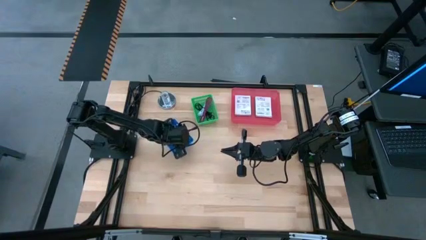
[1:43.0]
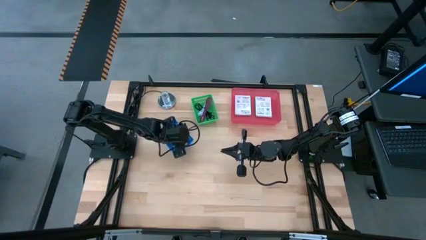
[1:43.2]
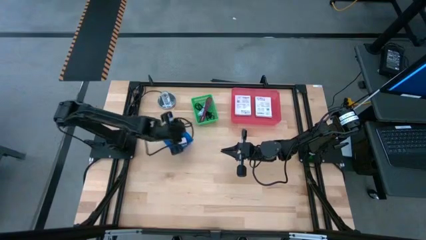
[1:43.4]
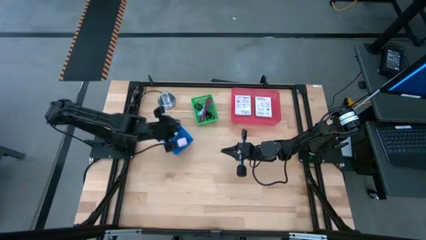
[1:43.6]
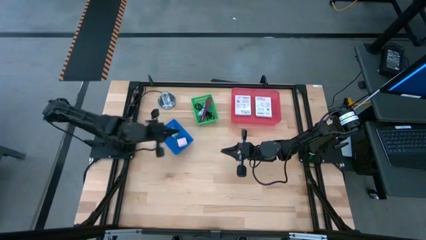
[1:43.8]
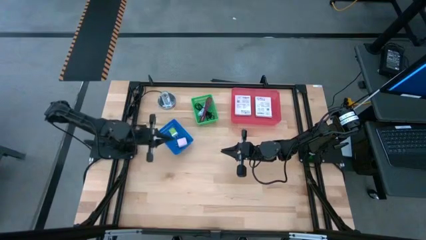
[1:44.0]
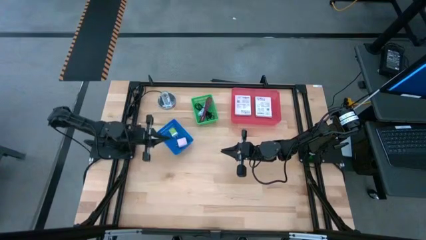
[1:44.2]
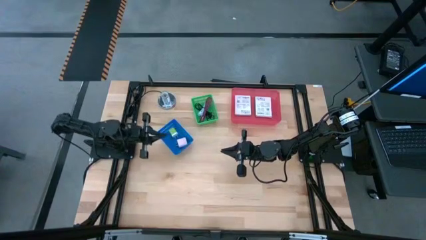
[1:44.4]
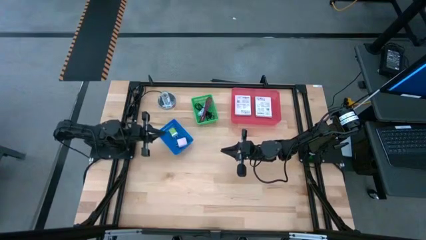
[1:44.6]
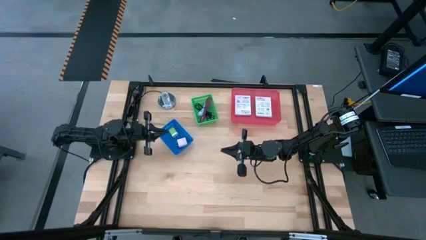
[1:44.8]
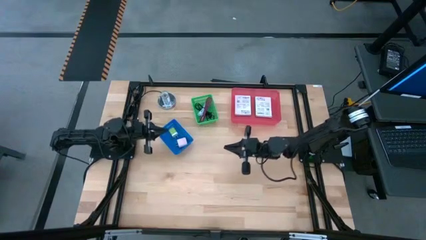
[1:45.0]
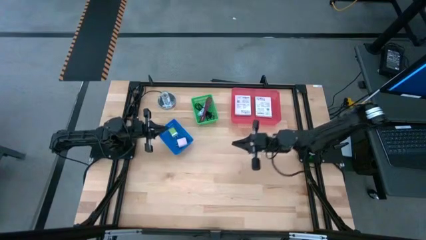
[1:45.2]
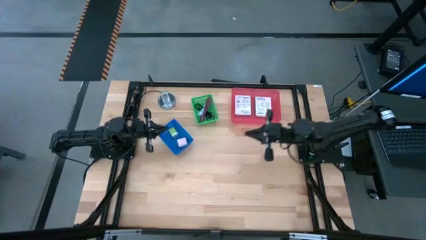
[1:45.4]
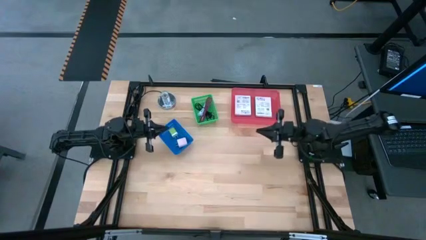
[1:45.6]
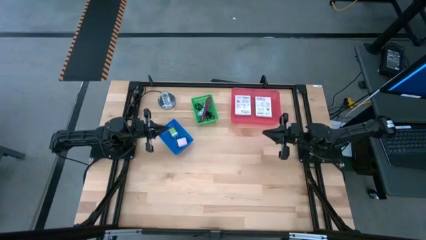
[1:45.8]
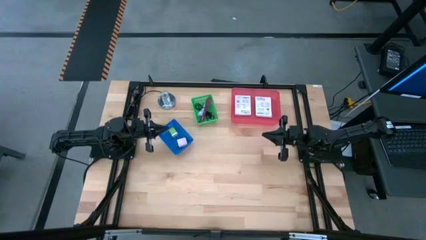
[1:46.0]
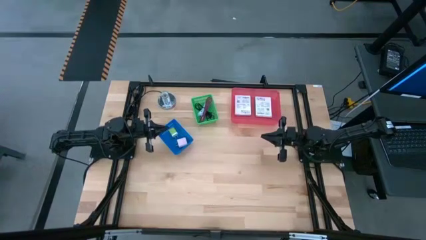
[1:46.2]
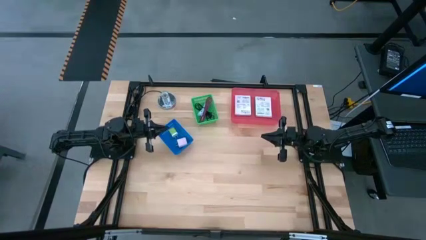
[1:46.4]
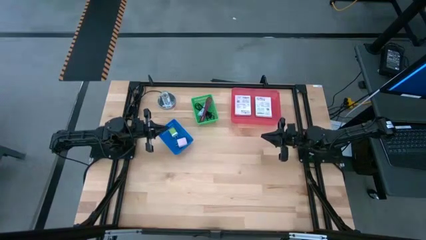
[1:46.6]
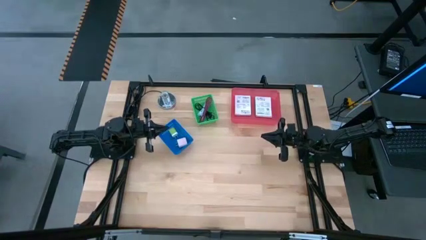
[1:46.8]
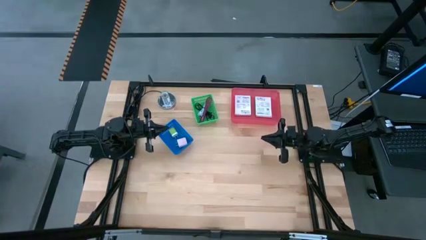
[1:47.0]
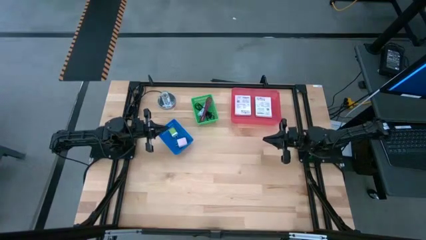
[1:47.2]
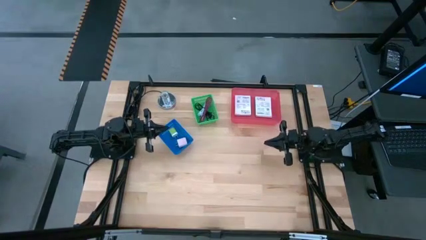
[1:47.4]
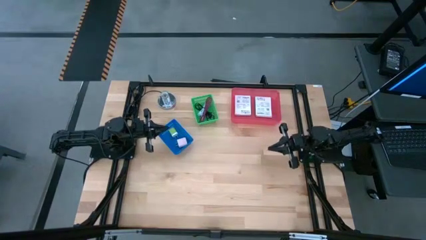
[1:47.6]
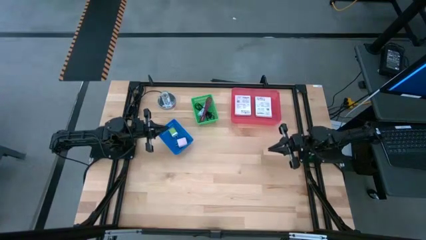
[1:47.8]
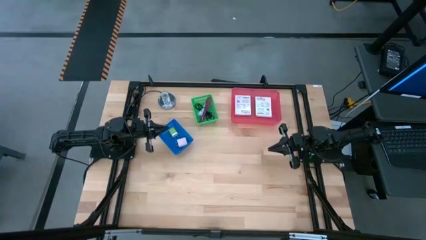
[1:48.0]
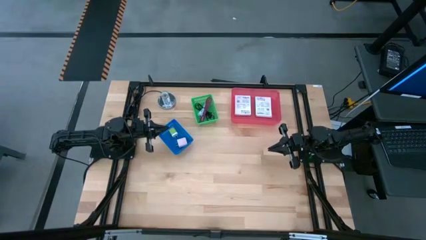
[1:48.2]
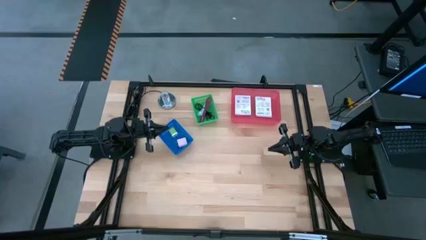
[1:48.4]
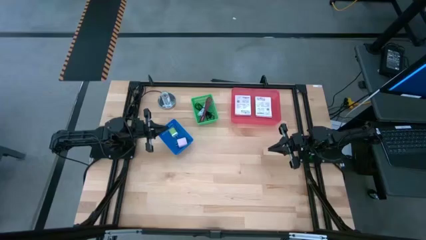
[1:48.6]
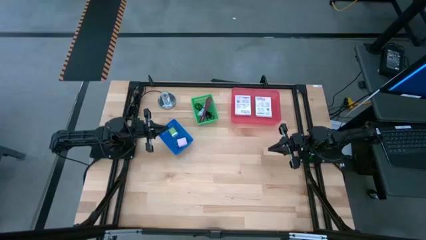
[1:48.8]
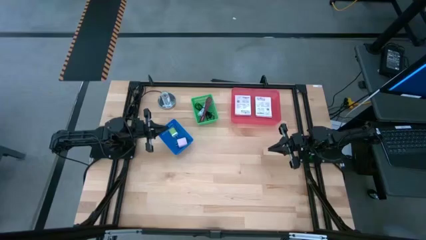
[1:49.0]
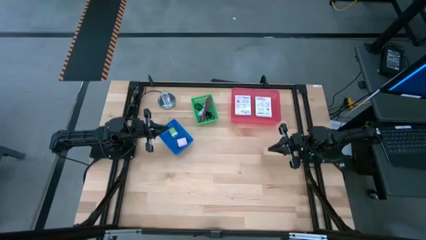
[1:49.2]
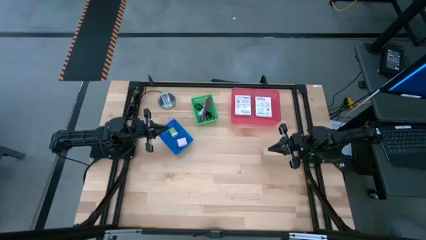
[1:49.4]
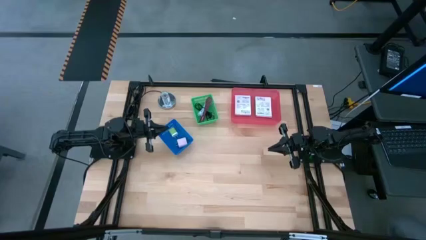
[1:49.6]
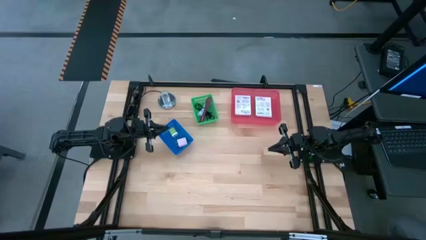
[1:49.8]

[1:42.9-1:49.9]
Task: Pick and place items into bin
Return to Home Position

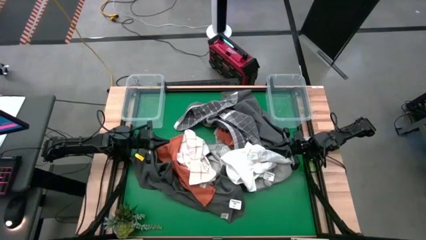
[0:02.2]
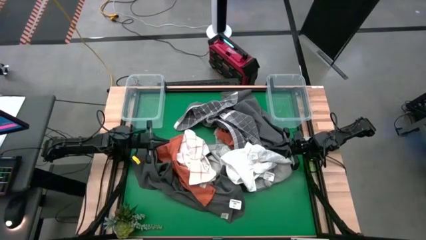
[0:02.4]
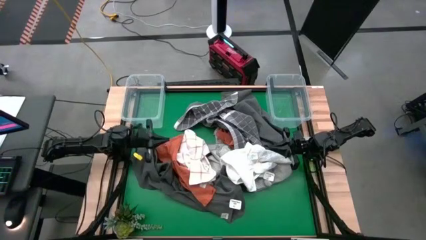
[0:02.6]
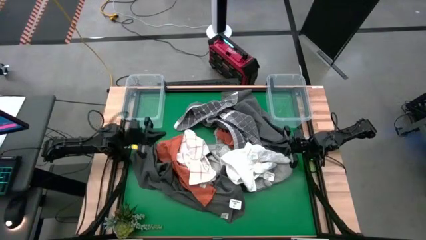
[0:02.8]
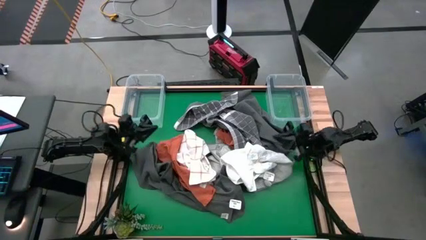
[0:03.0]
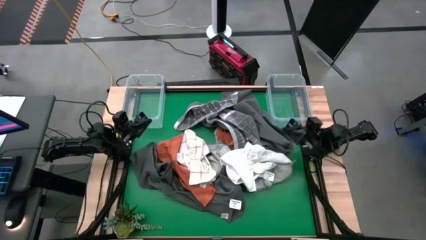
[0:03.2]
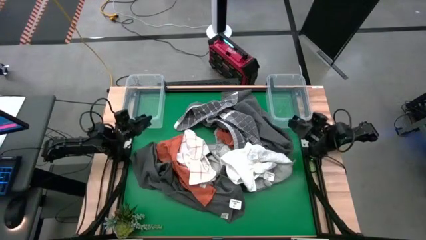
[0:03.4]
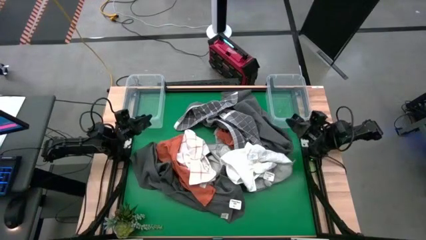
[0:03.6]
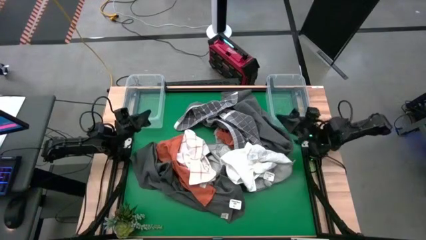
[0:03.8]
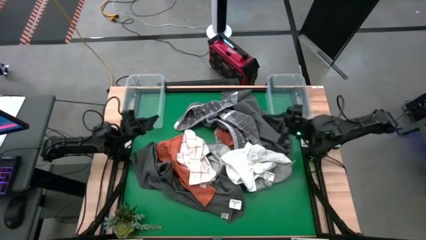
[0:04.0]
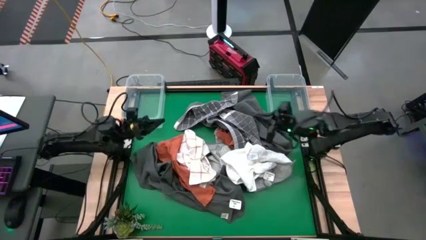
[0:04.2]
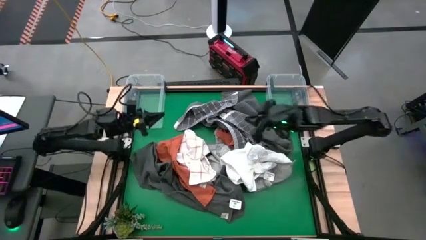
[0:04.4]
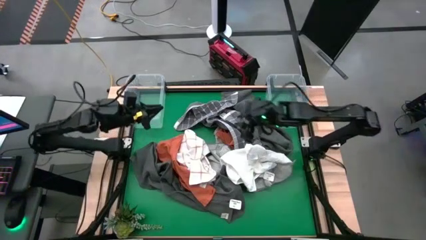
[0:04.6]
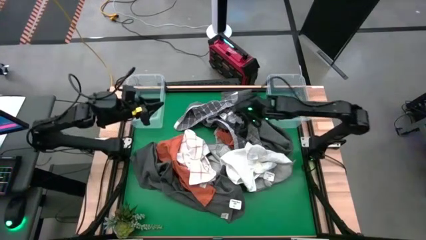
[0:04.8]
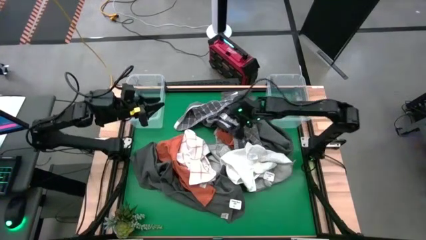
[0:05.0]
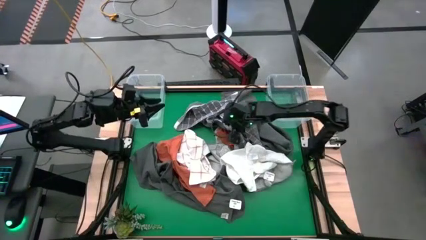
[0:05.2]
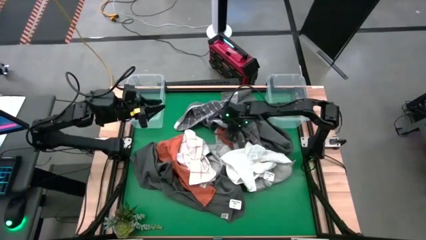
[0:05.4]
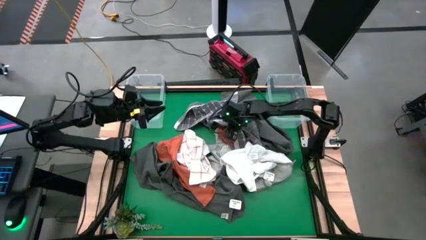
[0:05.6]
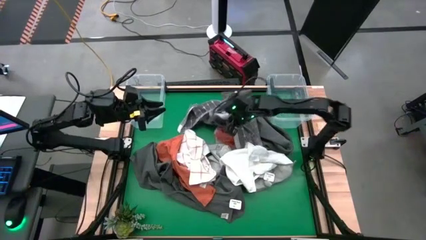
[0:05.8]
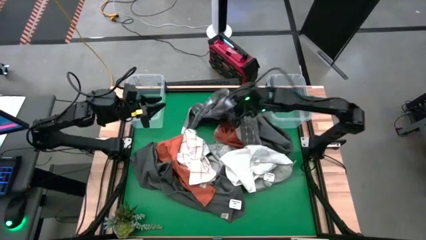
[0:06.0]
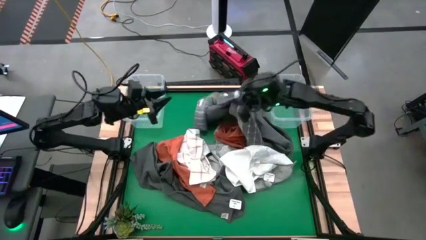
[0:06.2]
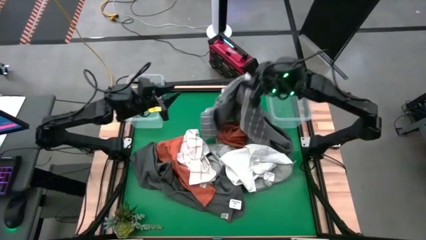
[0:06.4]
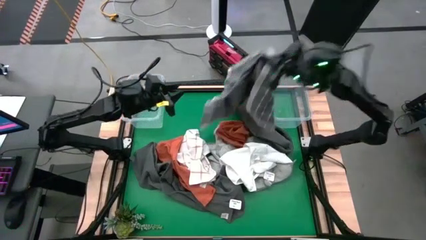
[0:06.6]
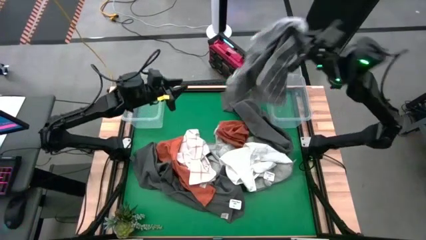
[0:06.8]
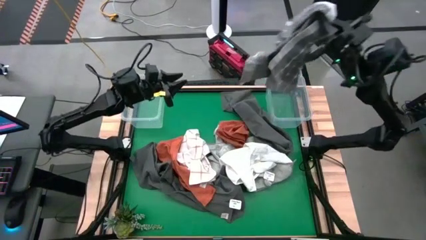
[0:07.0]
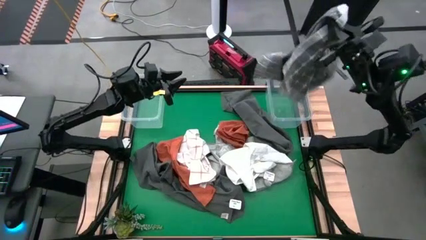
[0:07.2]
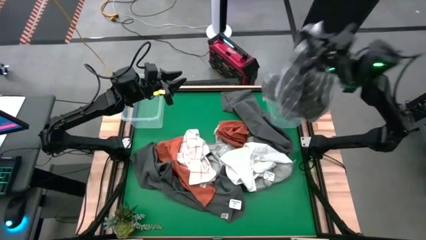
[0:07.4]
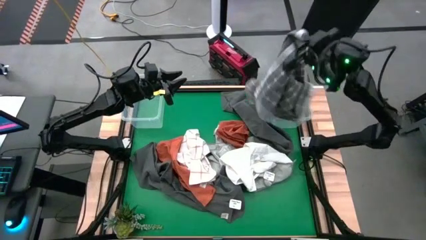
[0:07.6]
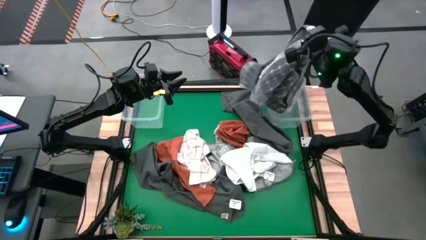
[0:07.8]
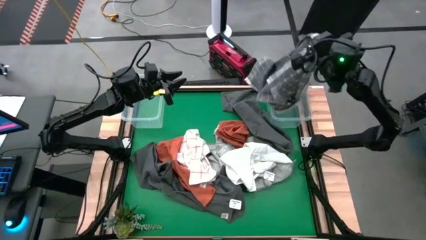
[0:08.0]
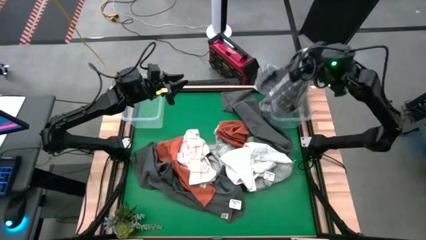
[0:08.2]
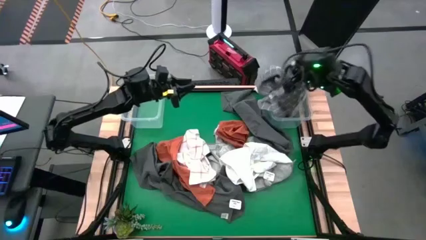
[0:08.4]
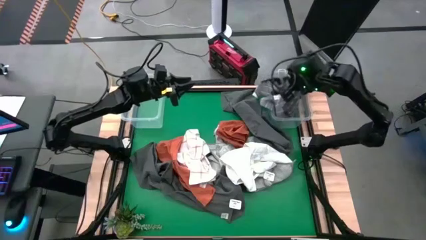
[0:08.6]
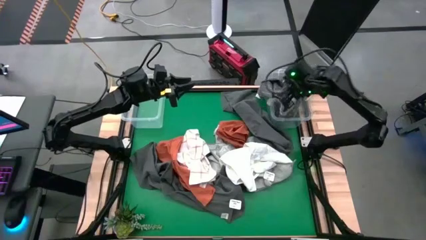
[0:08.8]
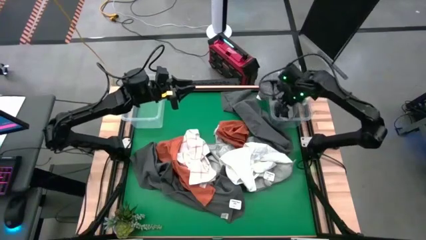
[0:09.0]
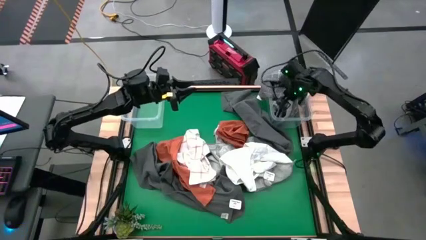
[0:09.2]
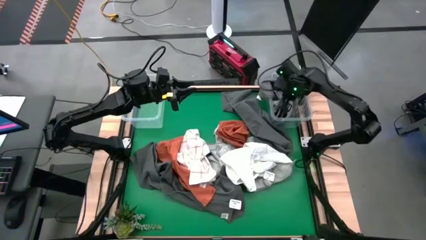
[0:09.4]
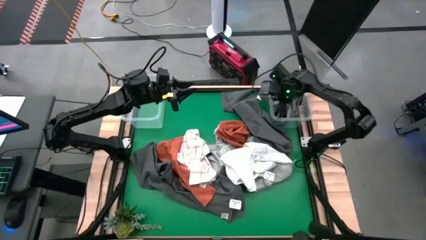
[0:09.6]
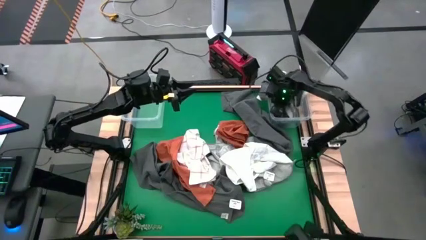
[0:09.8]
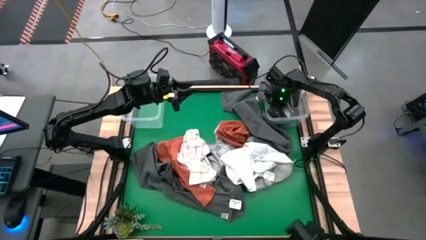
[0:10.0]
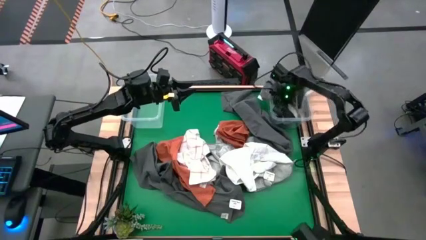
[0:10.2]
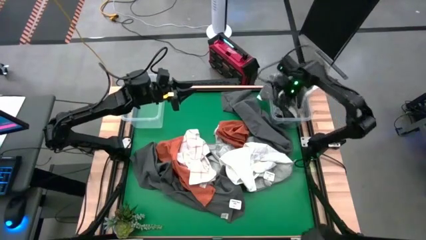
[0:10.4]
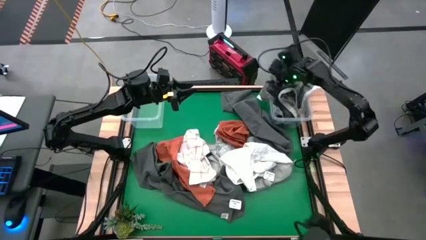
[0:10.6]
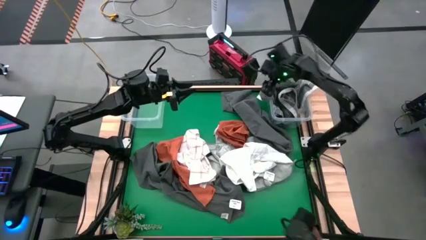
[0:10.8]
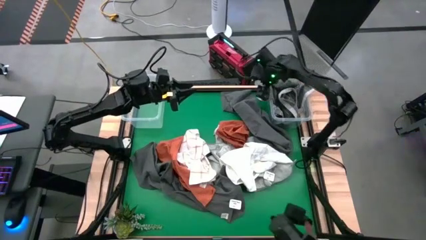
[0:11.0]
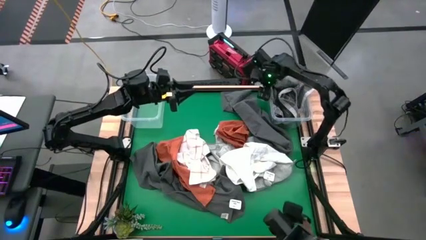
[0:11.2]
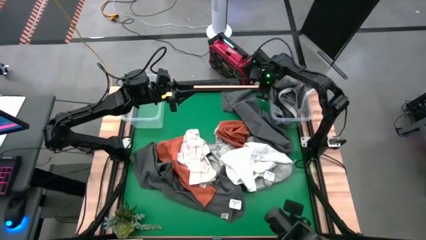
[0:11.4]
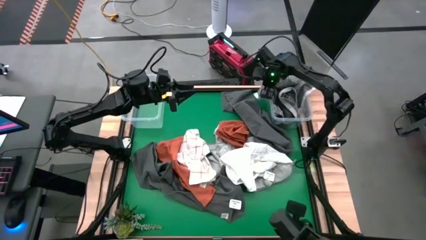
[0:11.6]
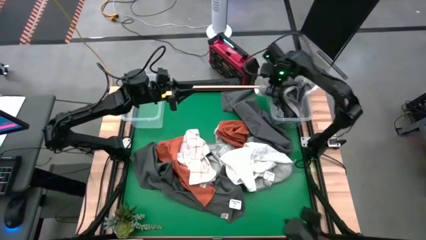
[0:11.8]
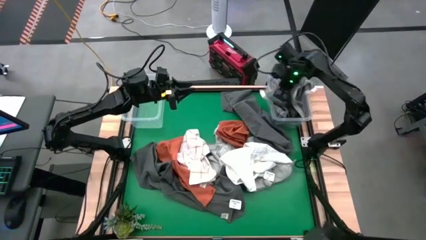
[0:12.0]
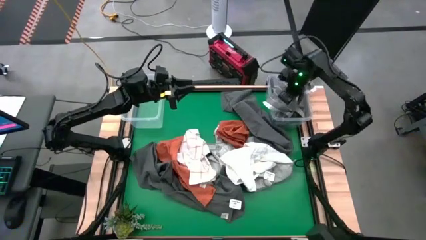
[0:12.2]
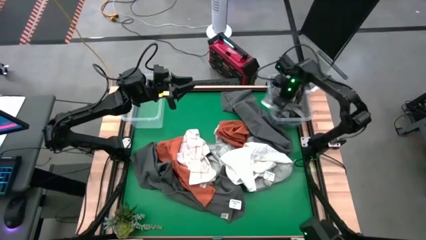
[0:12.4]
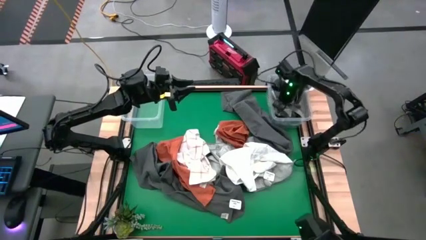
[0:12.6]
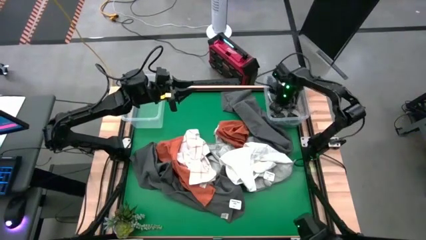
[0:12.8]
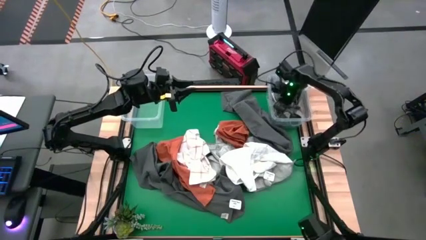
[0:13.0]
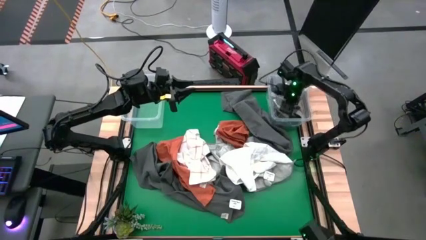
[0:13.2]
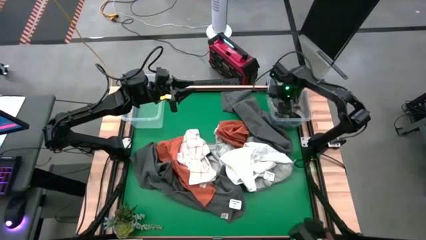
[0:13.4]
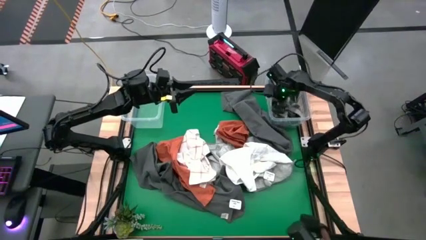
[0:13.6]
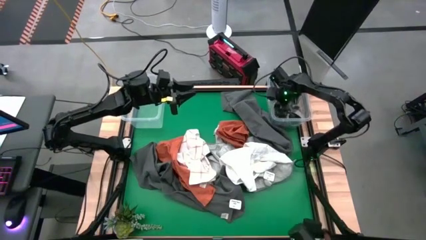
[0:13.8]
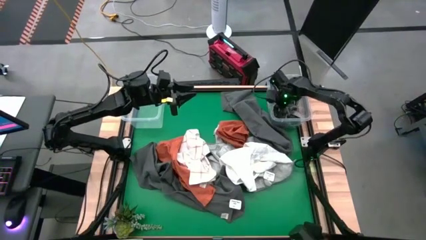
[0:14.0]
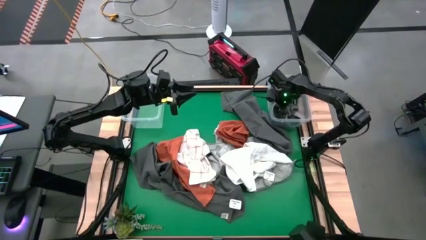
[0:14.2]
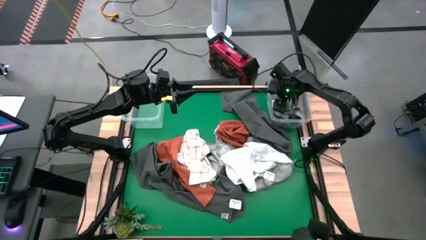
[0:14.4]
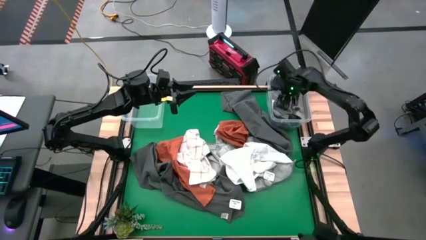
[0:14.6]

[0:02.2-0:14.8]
Task: Sort towels by color in basket
Put the gray patterned towel into the right transparent bin
